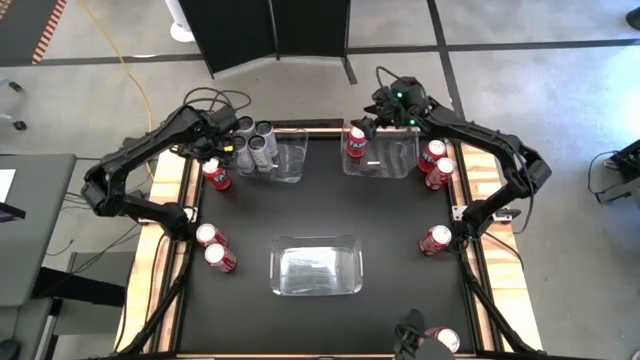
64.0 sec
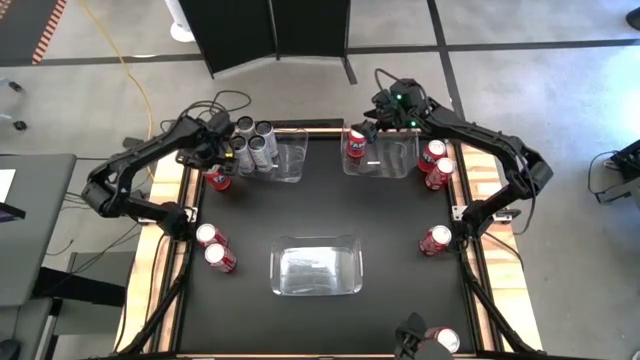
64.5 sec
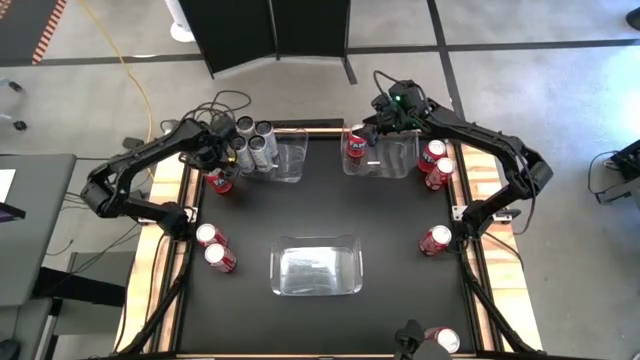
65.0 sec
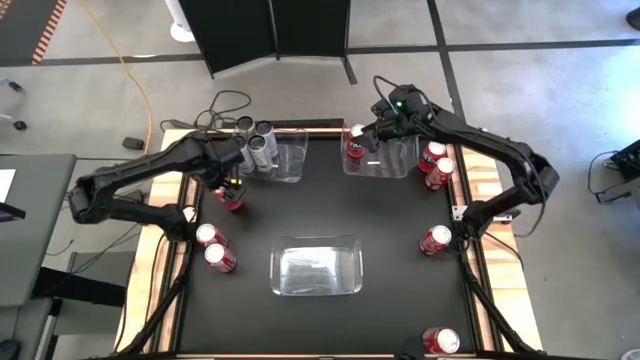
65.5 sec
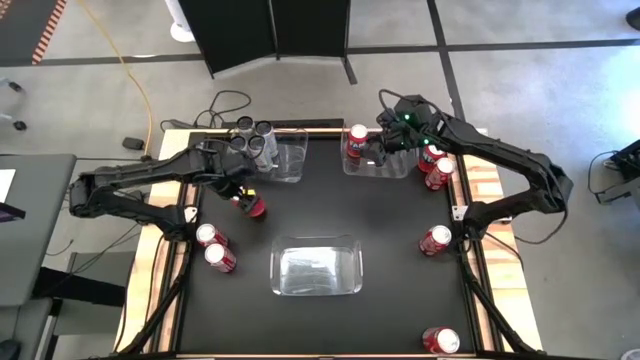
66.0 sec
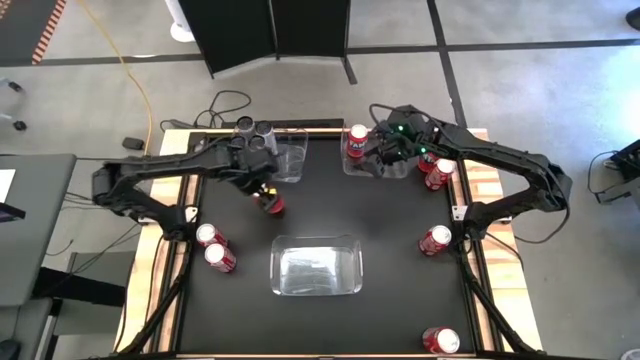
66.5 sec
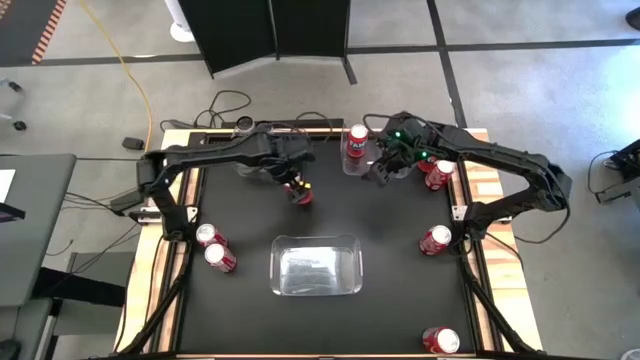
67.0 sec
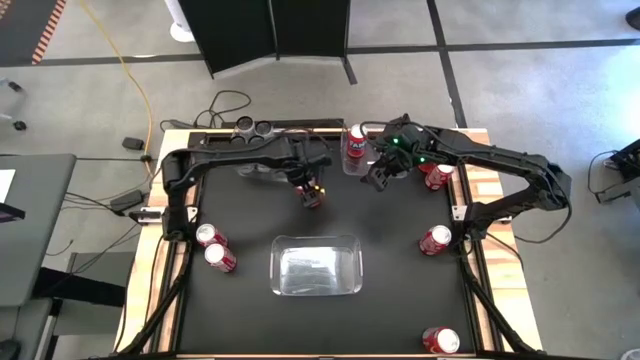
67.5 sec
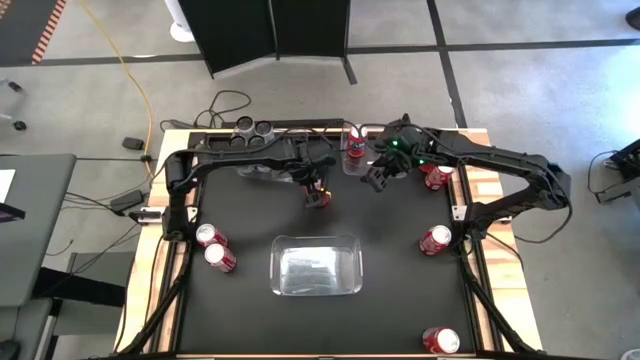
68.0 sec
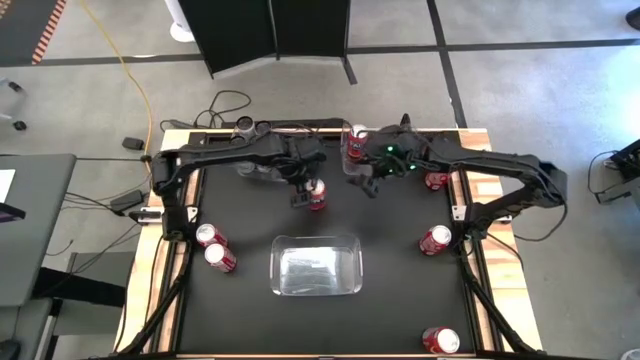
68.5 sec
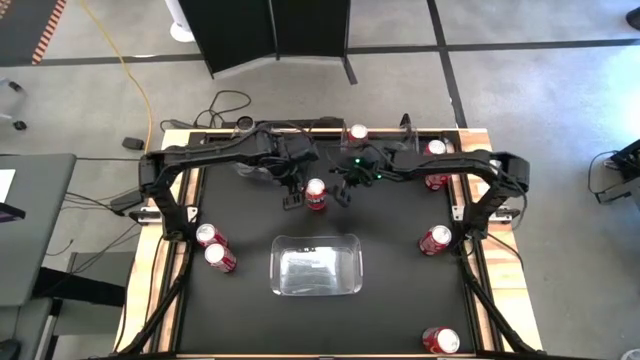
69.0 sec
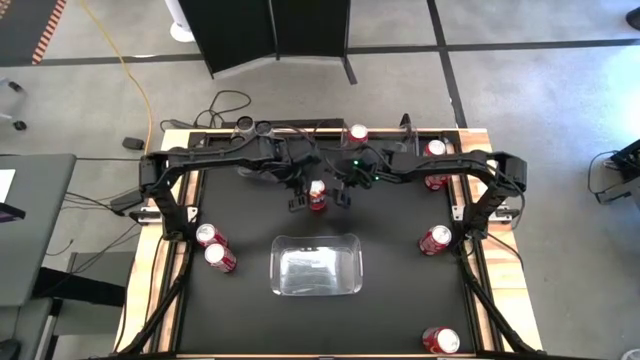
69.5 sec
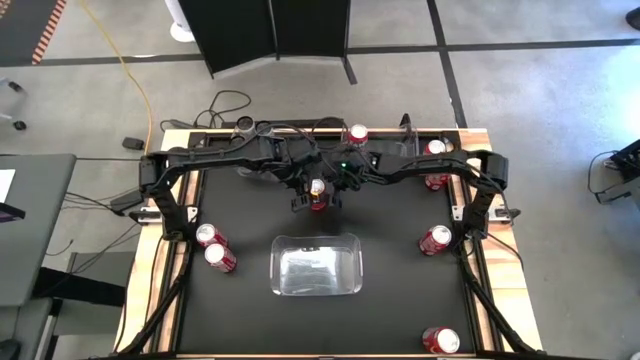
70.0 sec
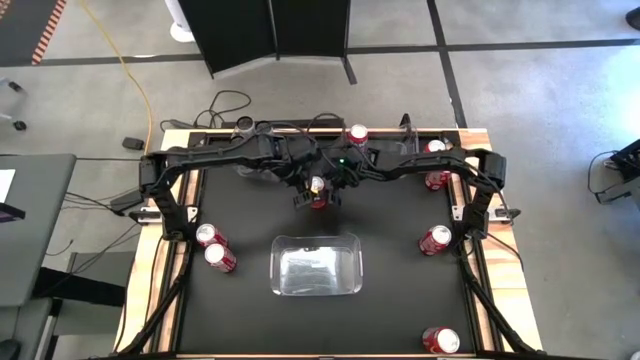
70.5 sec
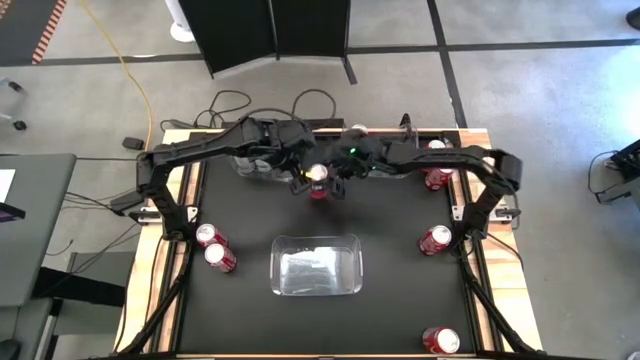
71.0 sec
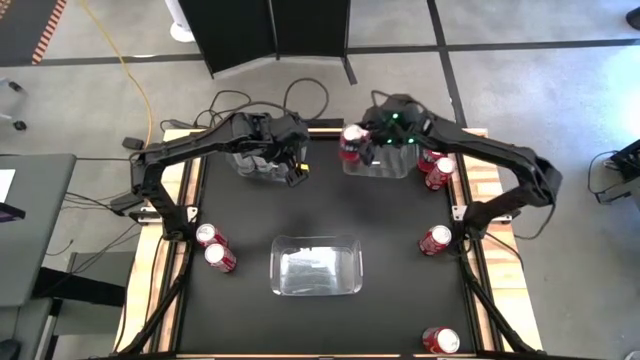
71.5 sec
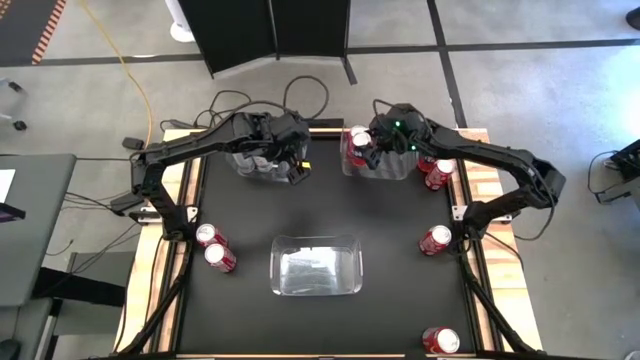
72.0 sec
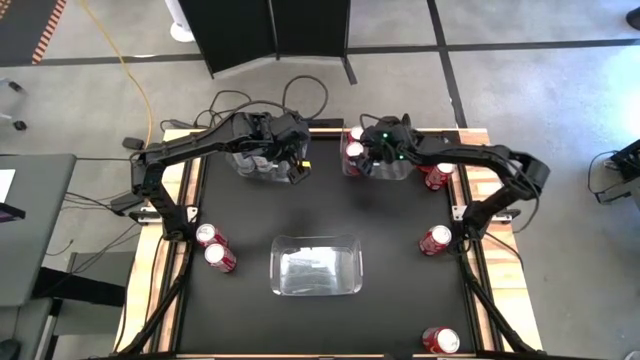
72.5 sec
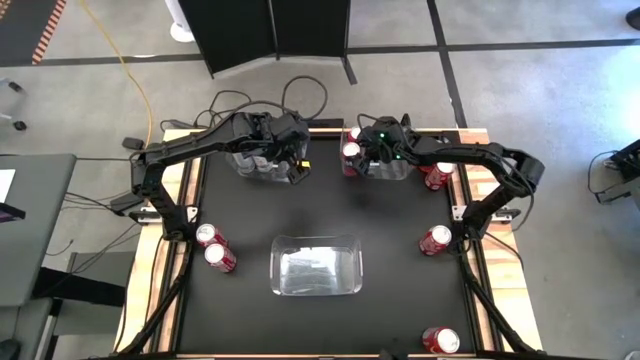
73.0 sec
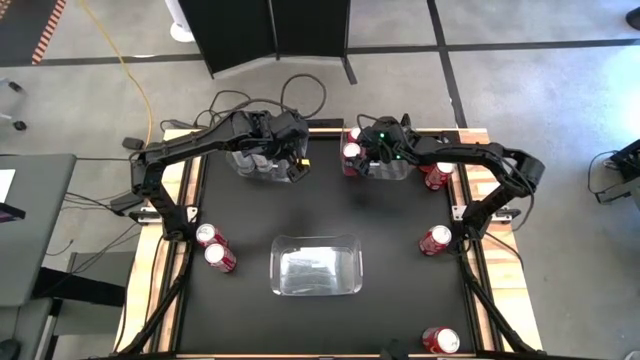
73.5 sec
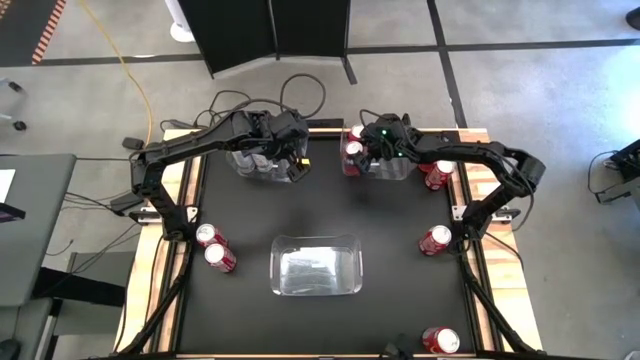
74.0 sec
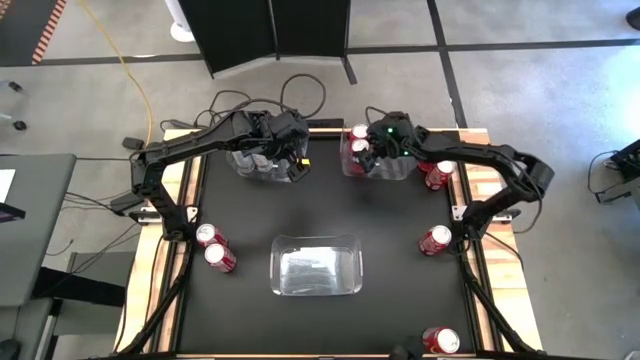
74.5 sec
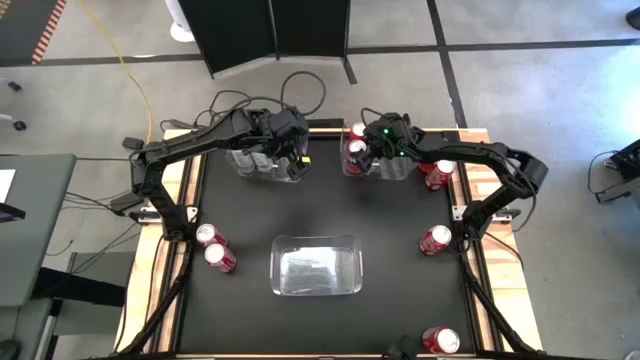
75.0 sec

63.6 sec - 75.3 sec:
Task: Sort soda cans
Put the top left red soda can into the top right transparent bin

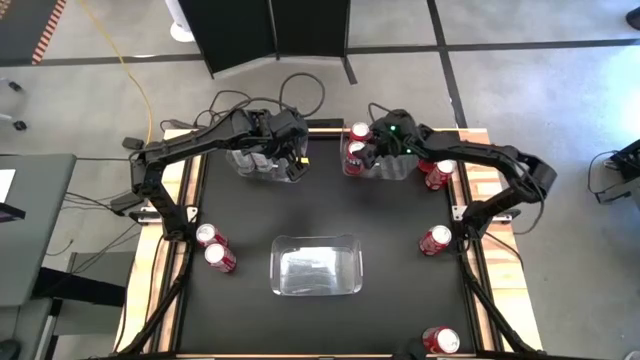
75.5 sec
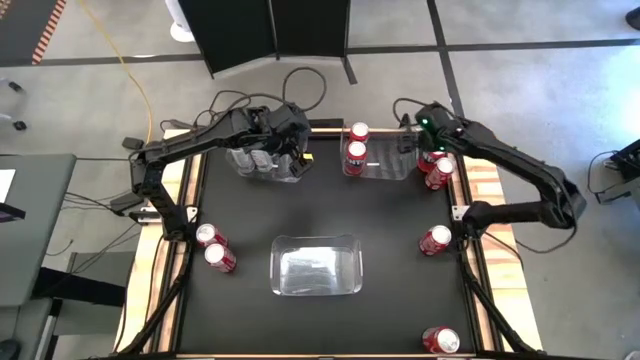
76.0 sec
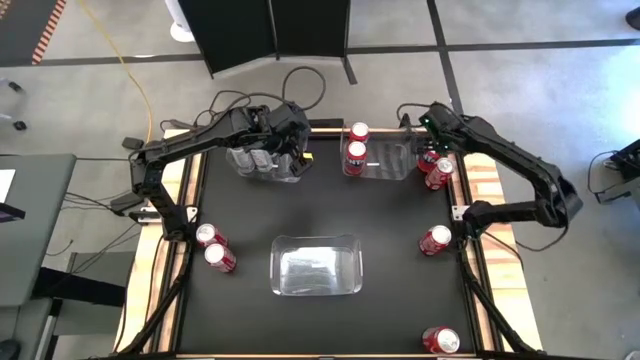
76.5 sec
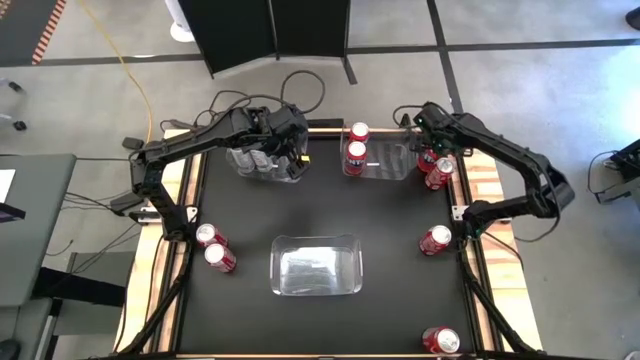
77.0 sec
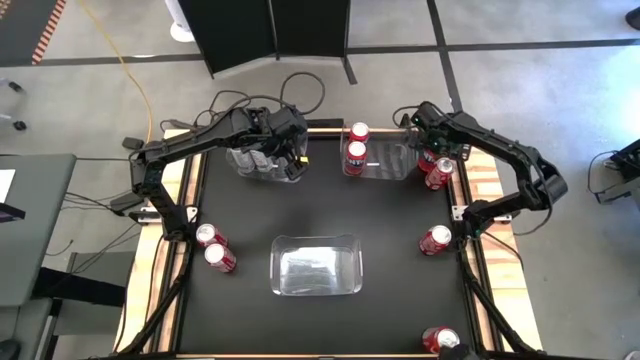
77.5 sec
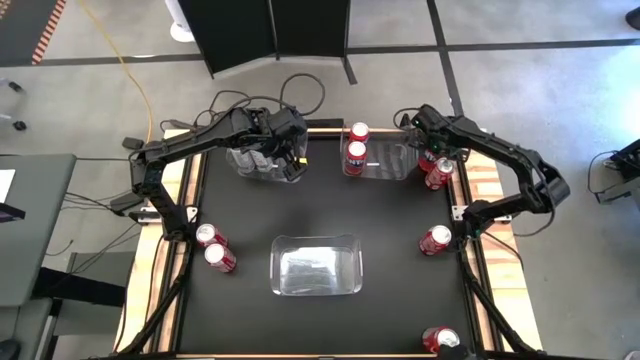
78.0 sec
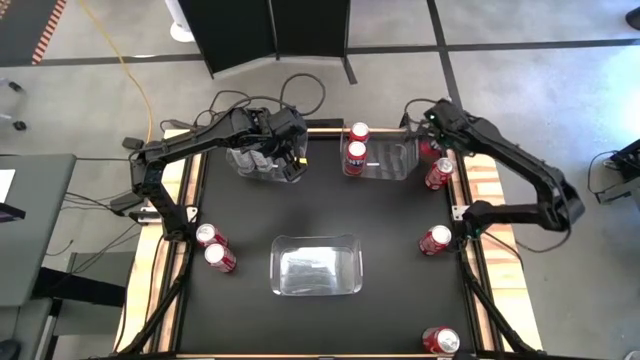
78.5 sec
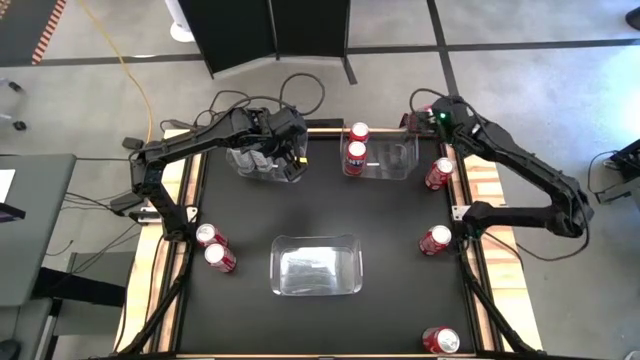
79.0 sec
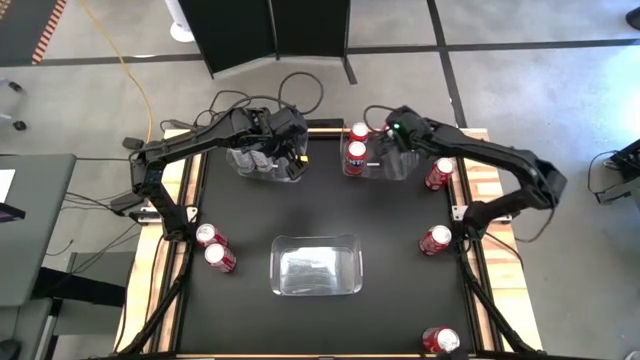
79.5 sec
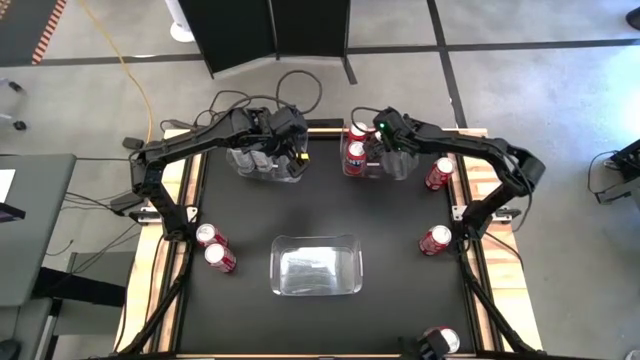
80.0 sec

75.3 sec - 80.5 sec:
Put the top red soda can into the top right transparent bin

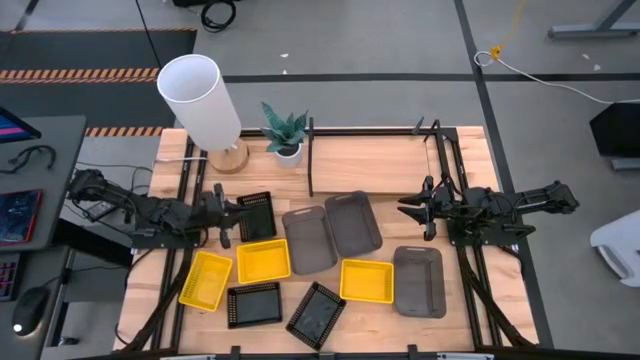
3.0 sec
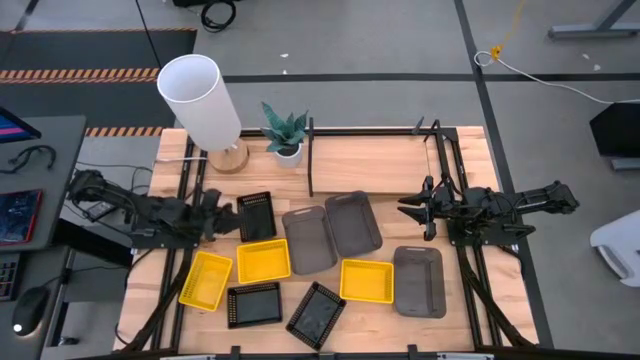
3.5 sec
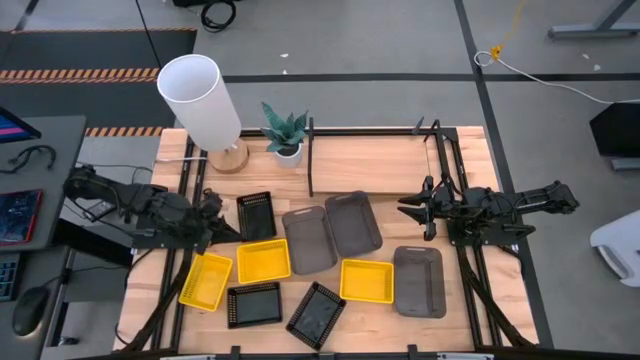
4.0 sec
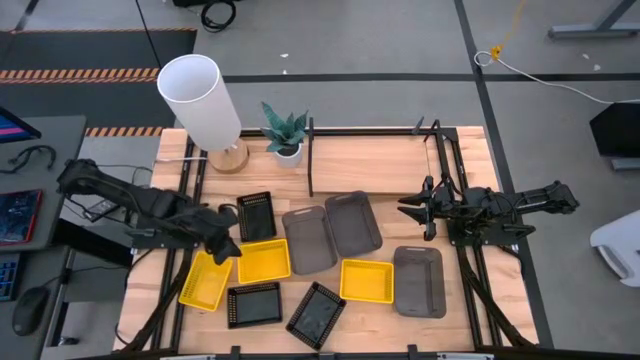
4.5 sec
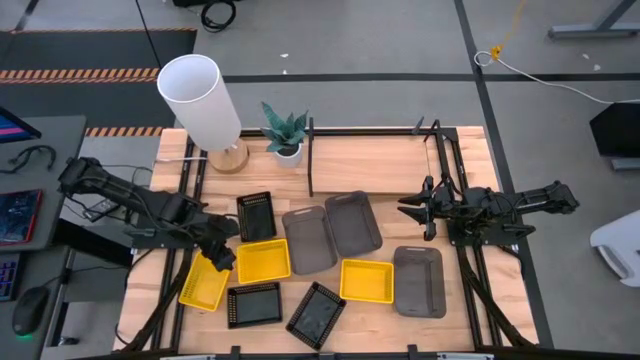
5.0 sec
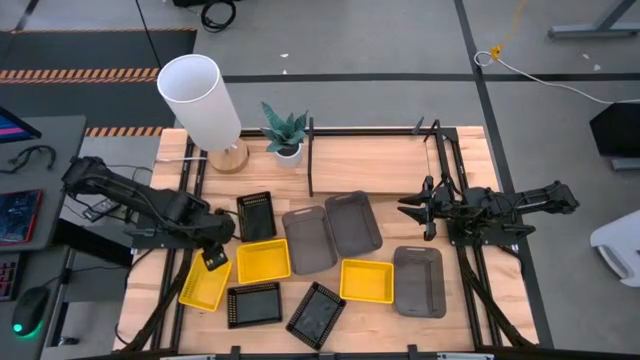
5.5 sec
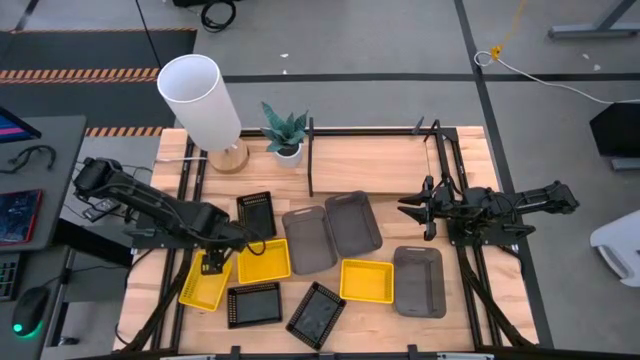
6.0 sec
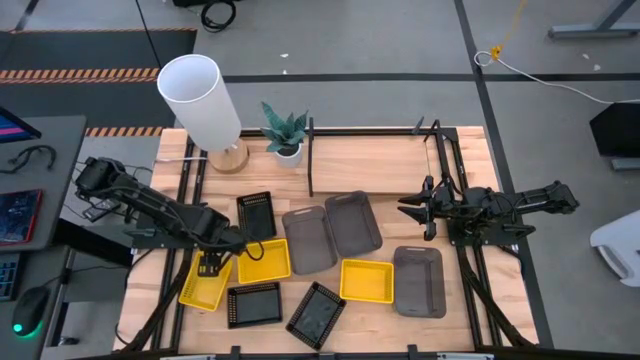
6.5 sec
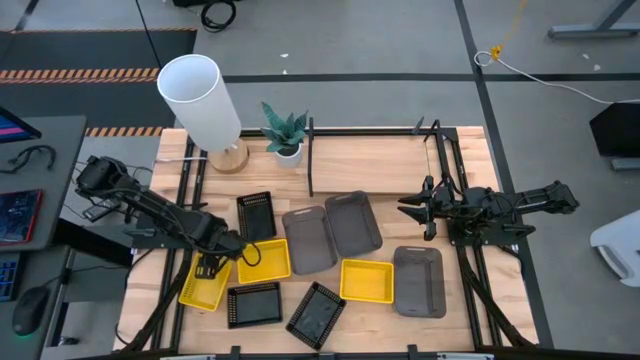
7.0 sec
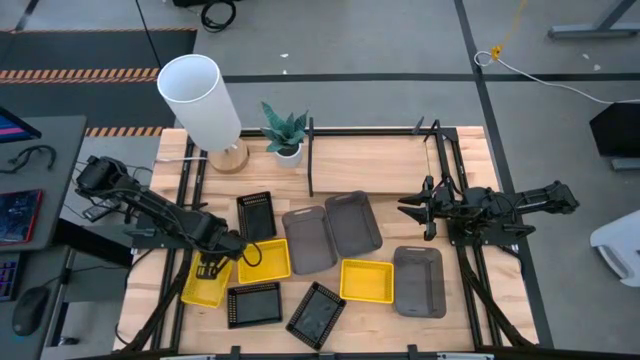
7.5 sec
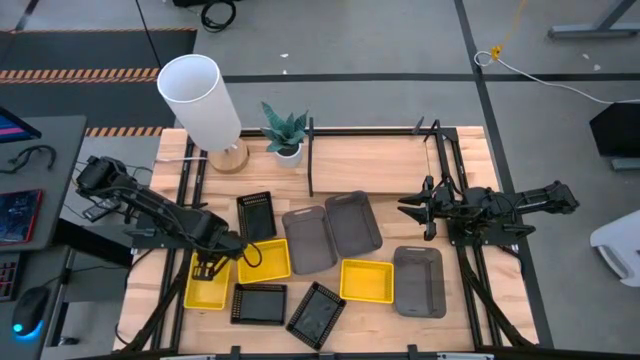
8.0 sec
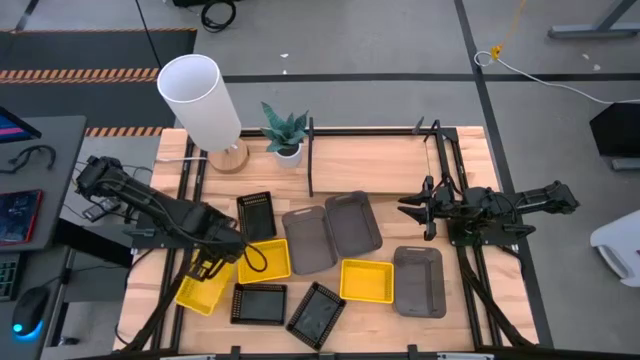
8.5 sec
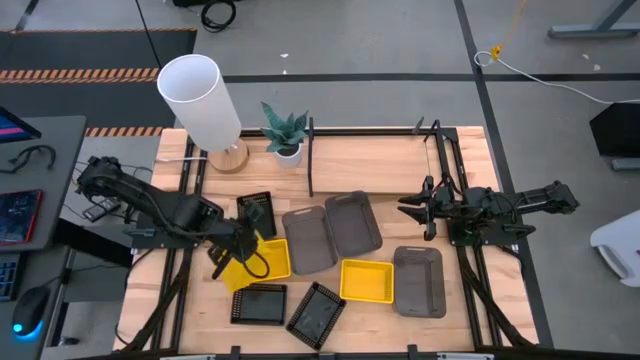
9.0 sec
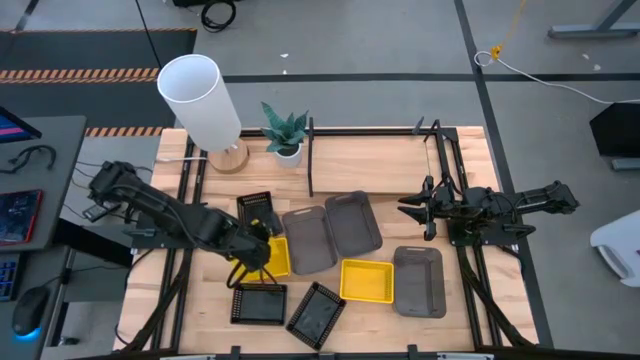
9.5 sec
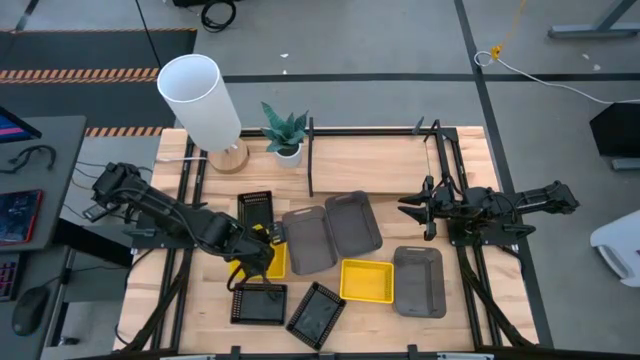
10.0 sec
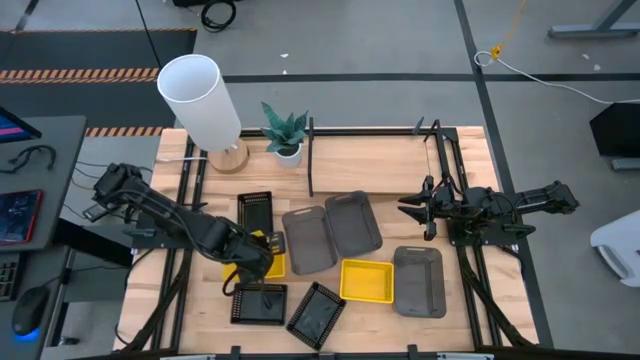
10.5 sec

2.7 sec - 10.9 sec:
Task: Stack baskets on shelf by color
Stack the left yellow bin on the middle yellow bin
